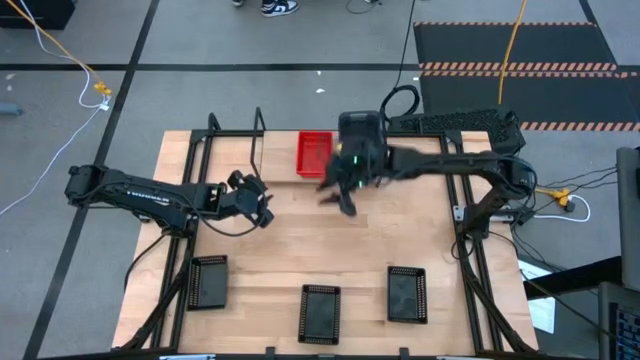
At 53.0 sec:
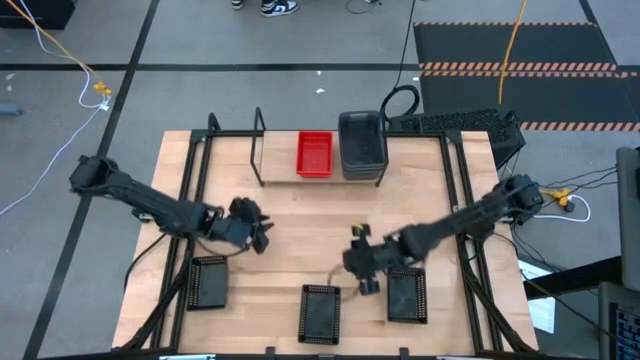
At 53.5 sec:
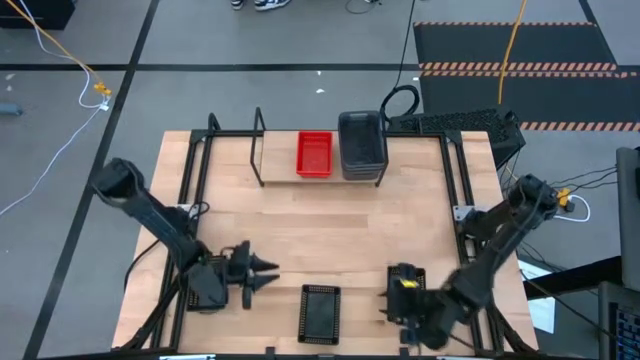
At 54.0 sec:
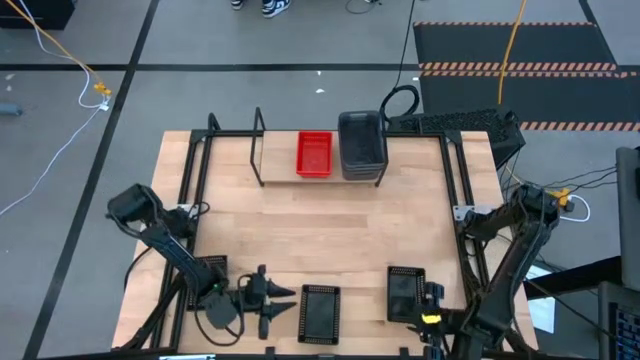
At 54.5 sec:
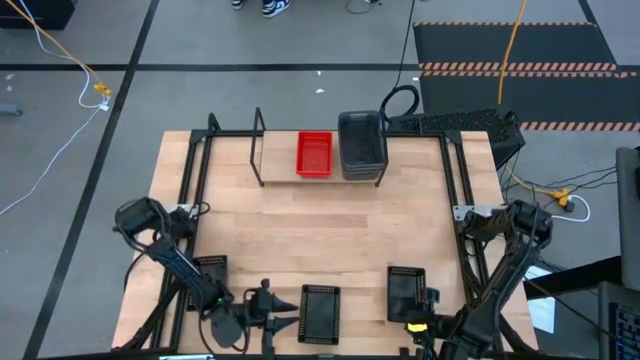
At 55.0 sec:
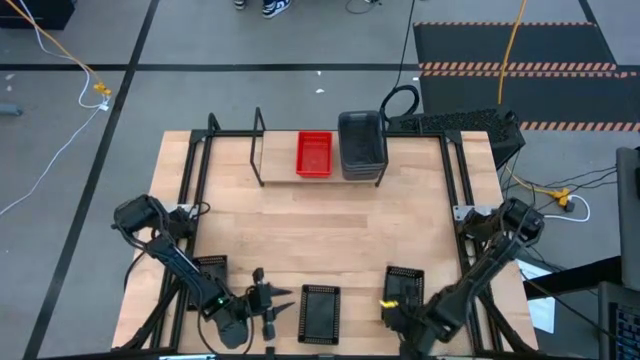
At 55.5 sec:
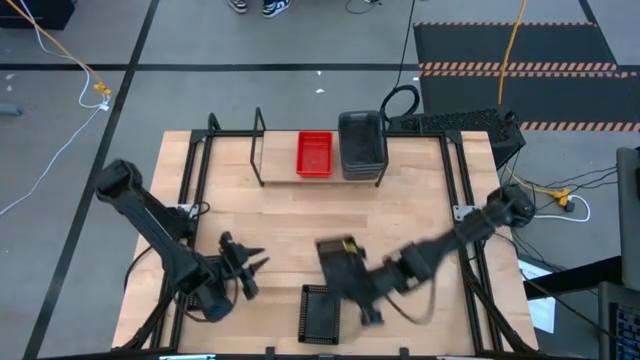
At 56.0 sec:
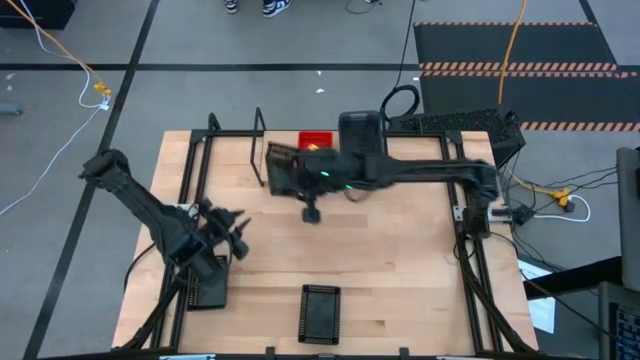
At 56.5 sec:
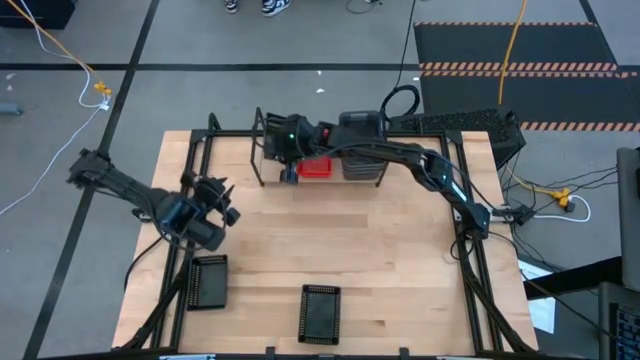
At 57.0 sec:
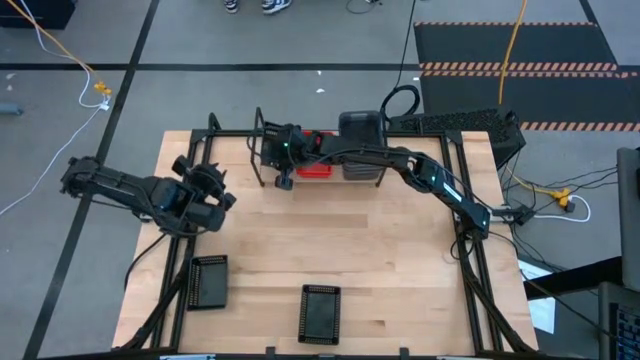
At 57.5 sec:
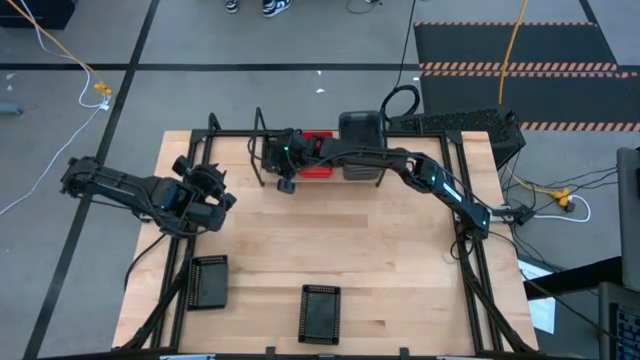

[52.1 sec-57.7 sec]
Task: Stack baskets on shelf by color
Put the right black bin on the shelf

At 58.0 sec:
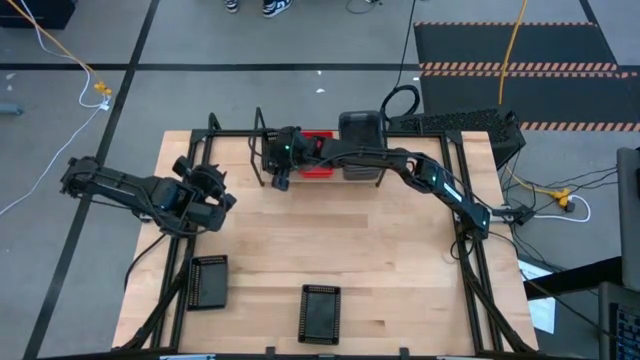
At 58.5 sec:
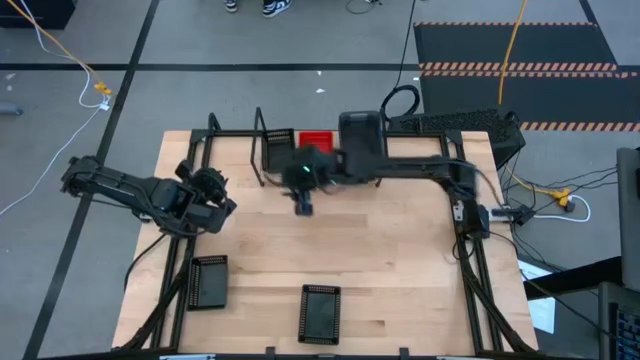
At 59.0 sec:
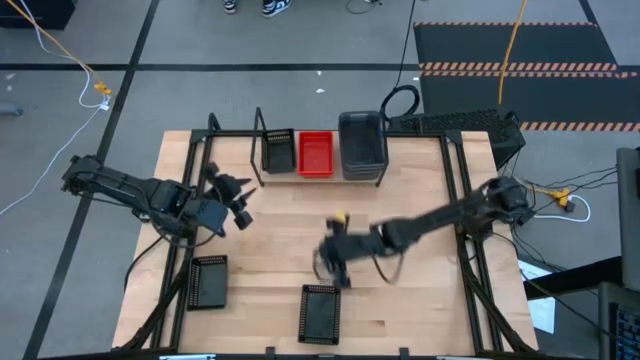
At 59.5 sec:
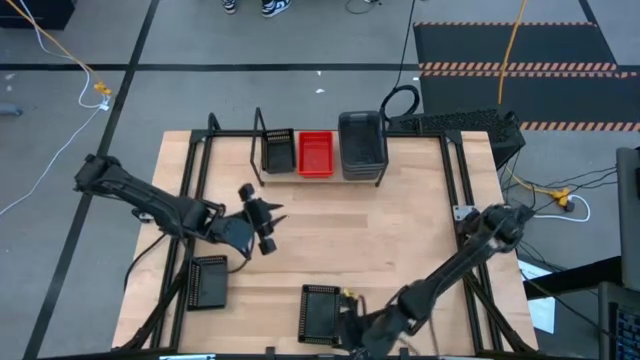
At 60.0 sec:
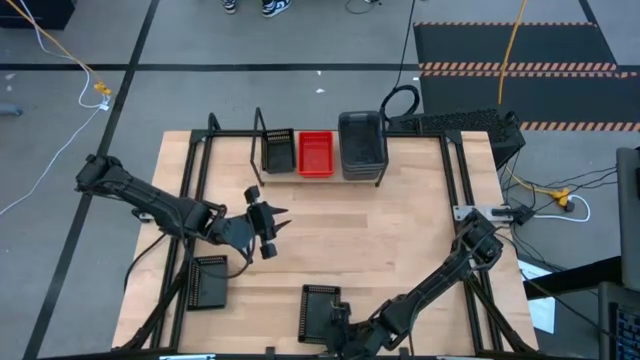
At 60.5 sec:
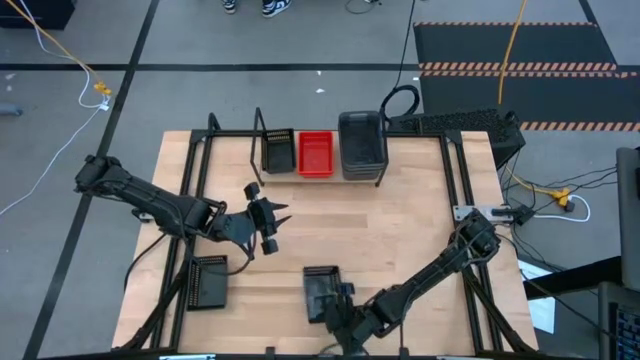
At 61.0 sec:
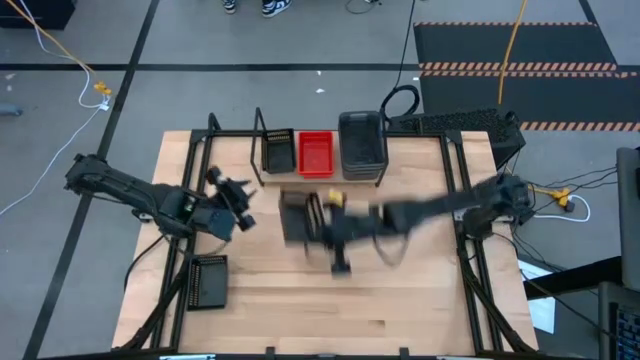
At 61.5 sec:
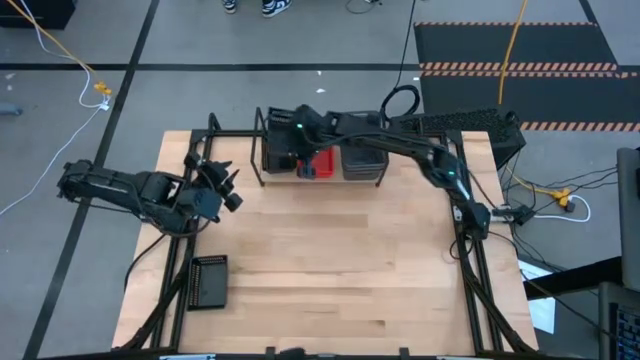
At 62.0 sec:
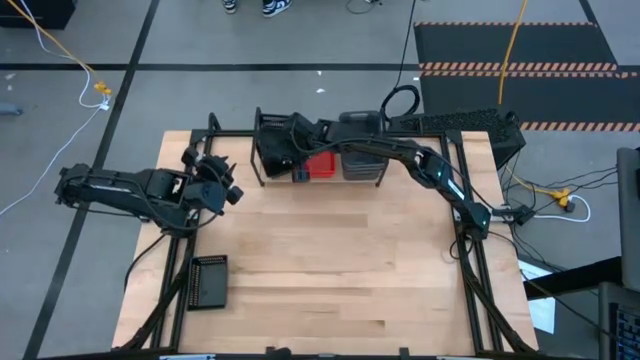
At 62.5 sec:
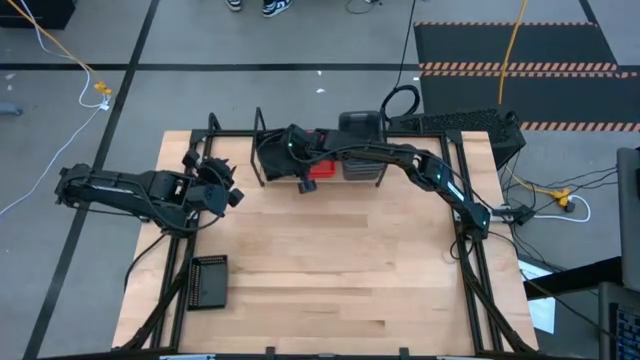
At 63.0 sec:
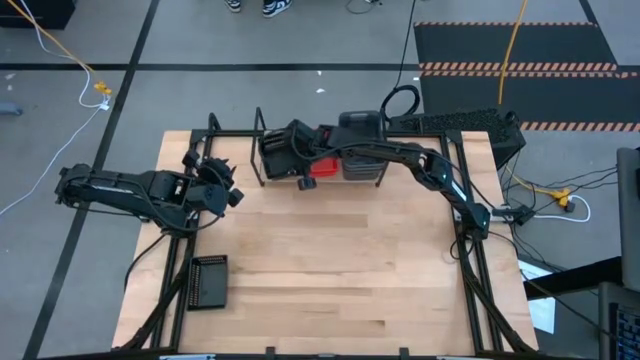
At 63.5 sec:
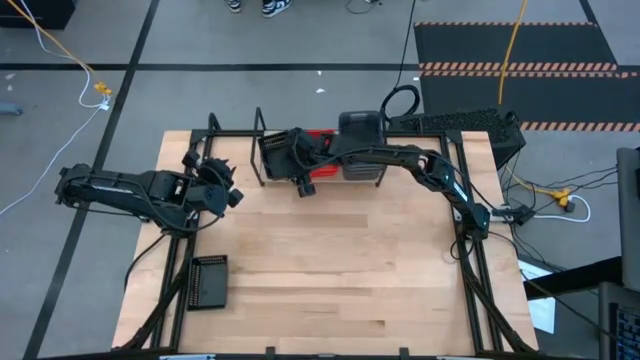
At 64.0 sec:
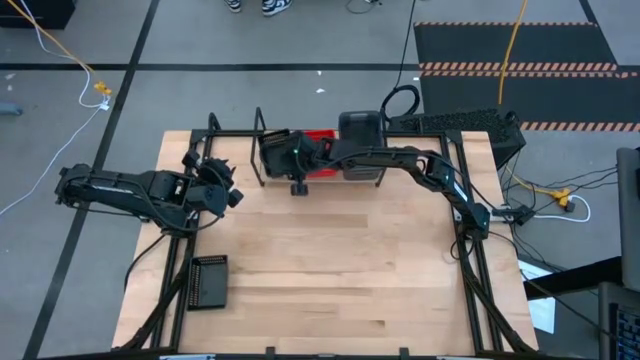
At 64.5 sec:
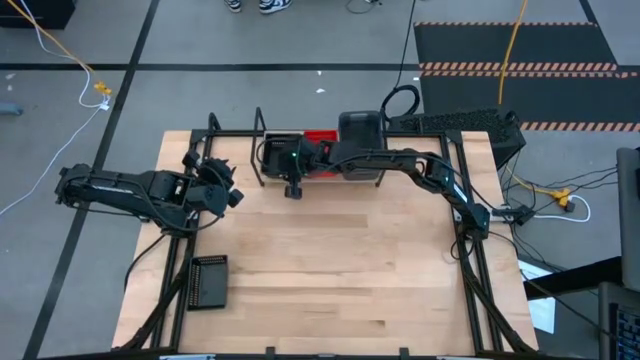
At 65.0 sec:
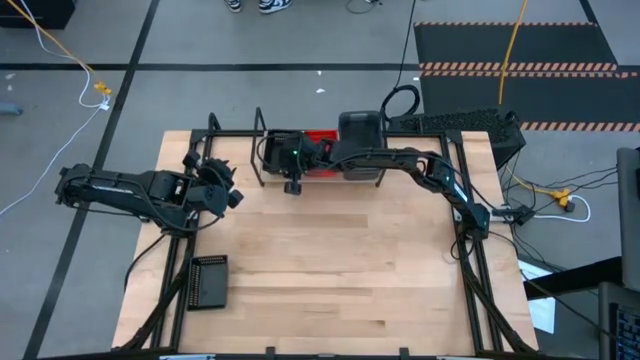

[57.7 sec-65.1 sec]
Stack the right black bin on top of the black bin on the shelf

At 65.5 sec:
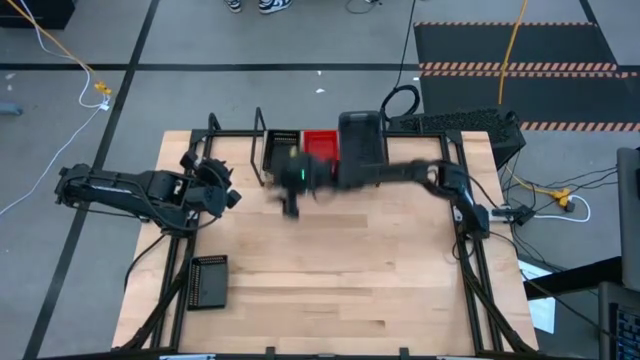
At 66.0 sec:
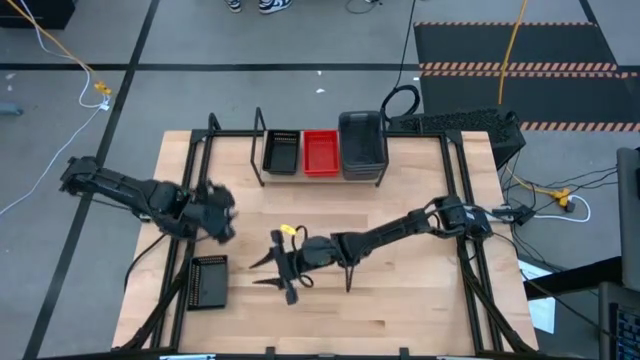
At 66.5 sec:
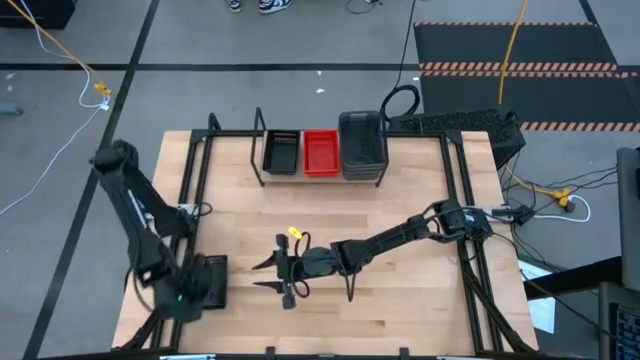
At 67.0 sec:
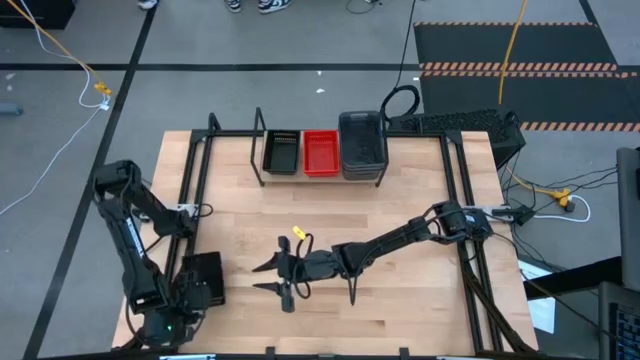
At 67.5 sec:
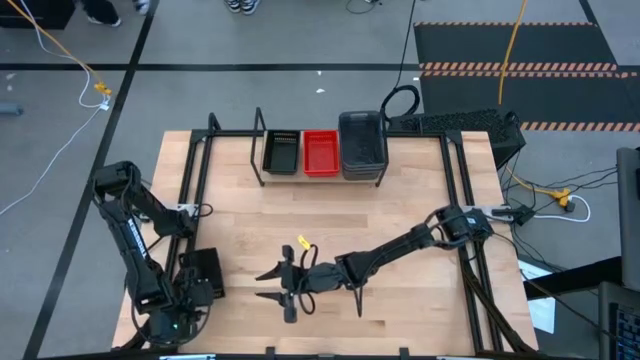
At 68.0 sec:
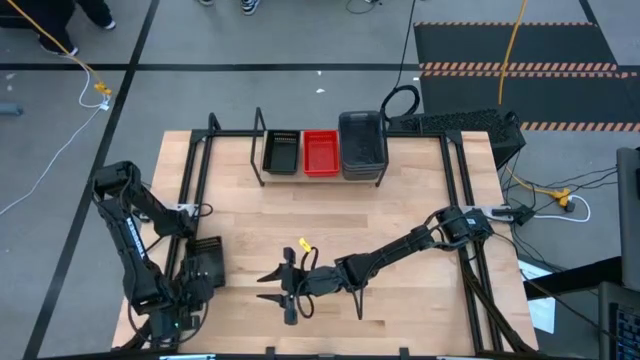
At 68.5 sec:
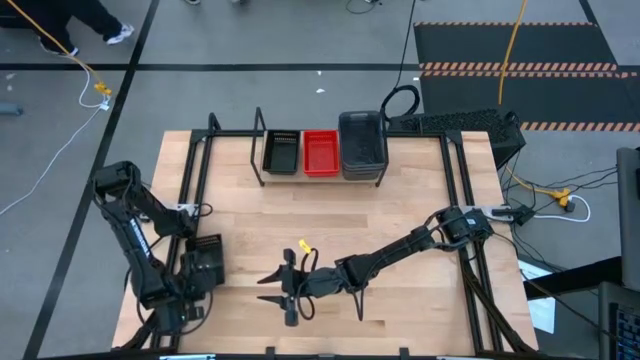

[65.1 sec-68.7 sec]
Stack the black bin on top of the black bins on the shelf

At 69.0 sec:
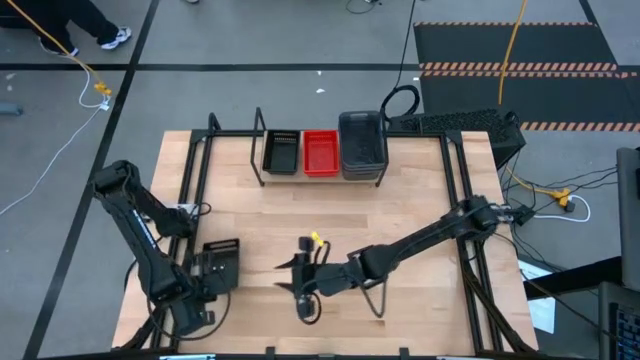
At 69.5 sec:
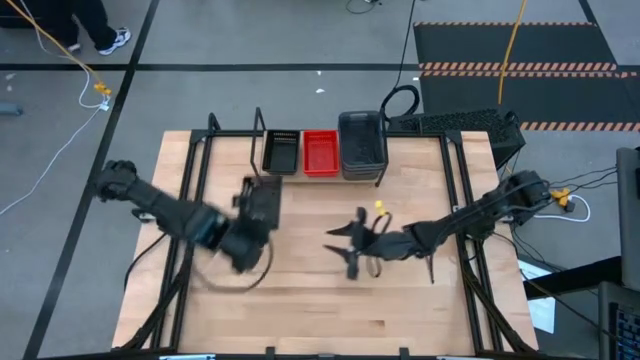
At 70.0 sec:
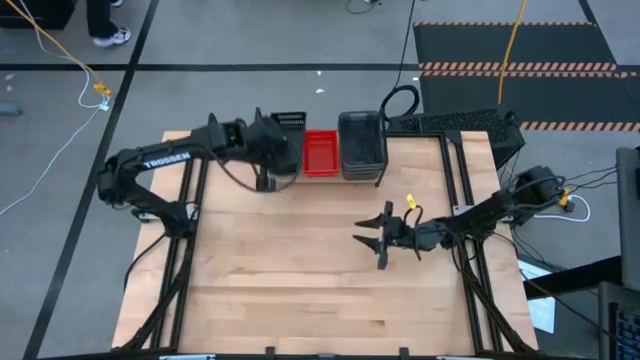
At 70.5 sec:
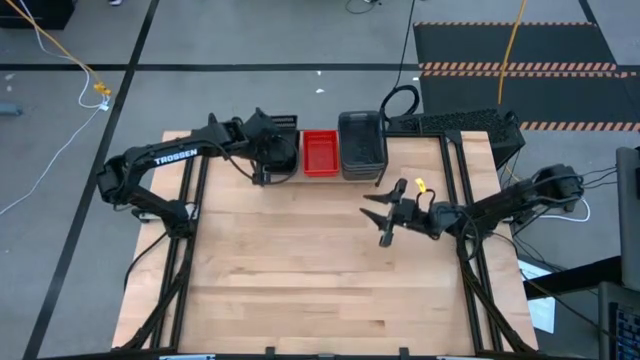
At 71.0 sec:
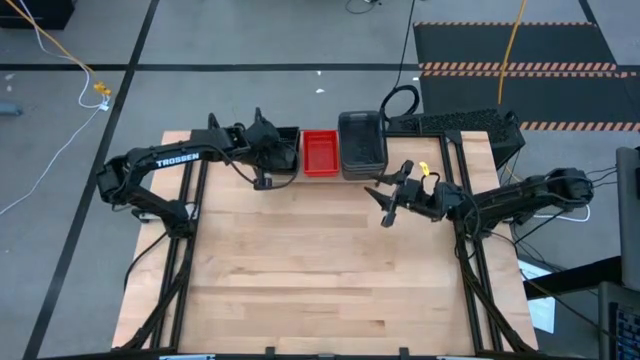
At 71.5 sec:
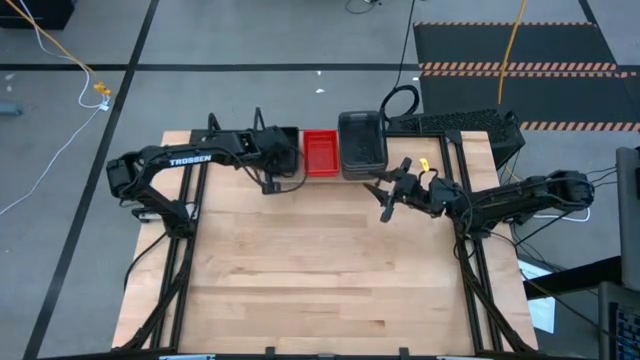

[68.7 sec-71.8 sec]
Stack the right black bin on top of the black bin on the shelf

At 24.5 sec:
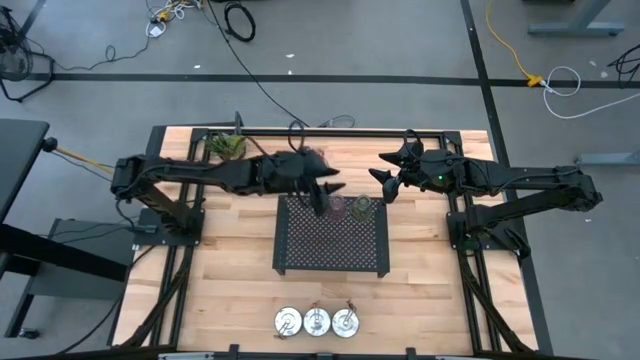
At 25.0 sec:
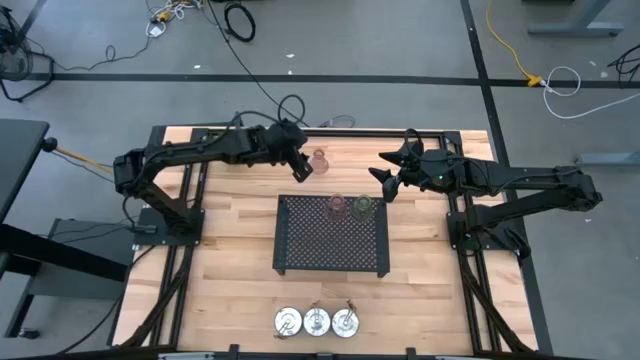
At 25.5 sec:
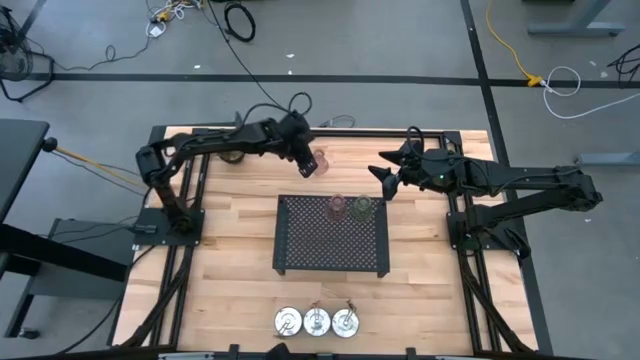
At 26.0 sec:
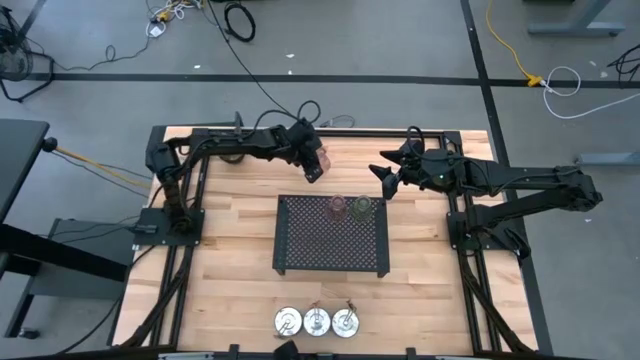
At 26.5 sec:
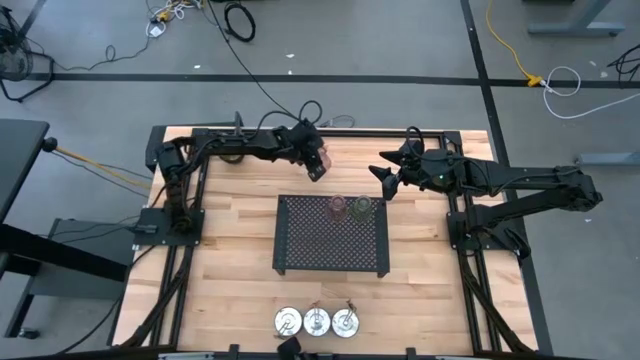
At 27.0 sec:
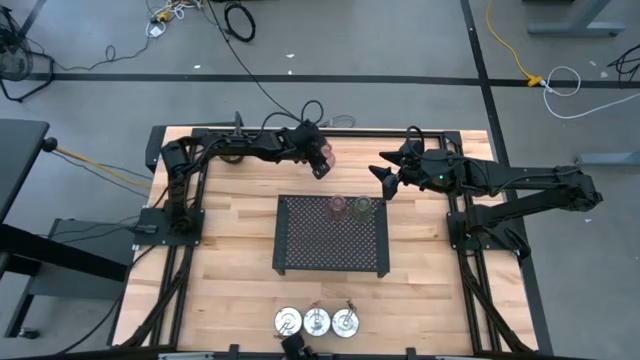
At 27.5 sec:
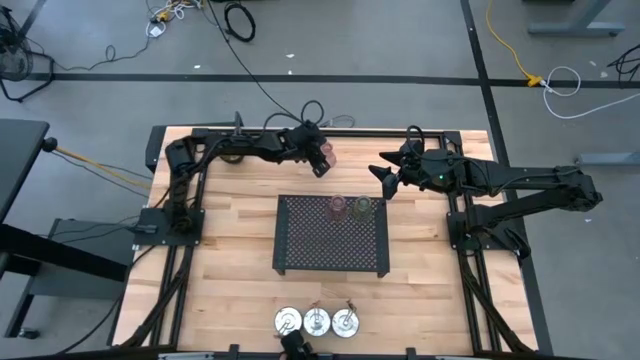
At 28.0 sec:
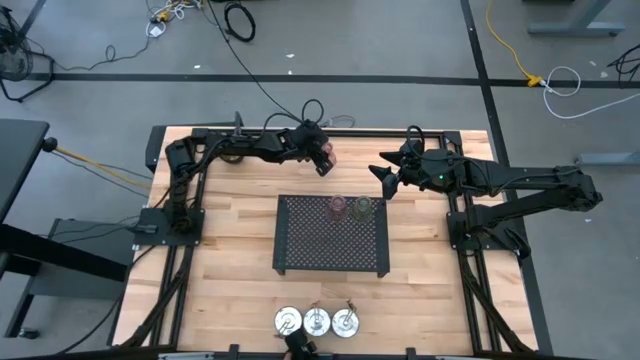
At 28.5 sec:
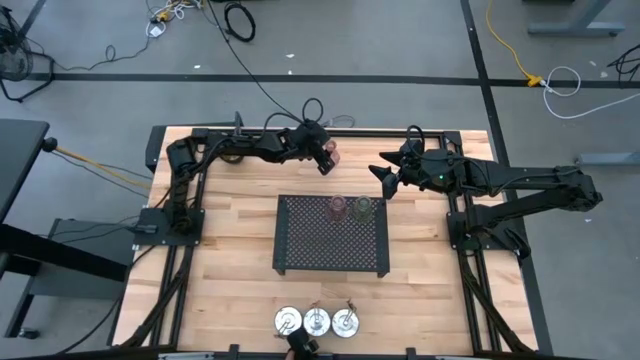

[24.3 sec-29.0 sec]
Task: Pick & Place candle stick holders
Put the pink glass candle holder on the shelf
